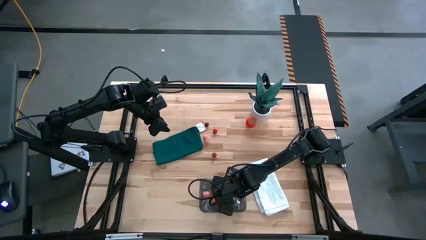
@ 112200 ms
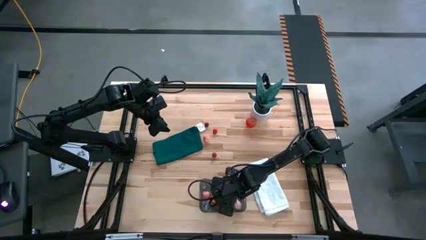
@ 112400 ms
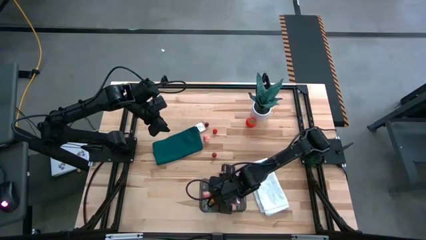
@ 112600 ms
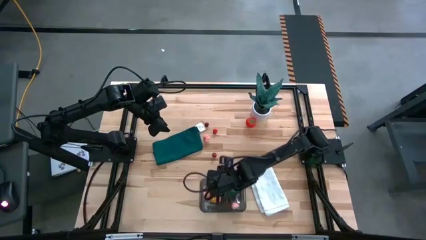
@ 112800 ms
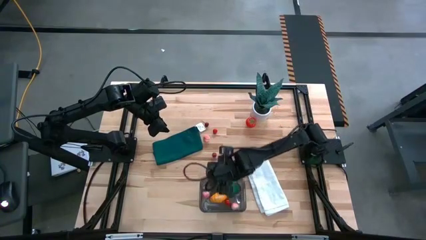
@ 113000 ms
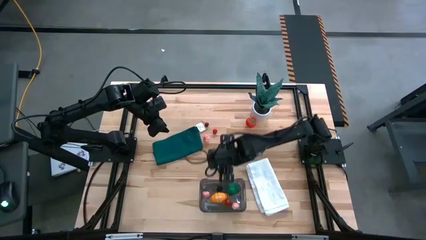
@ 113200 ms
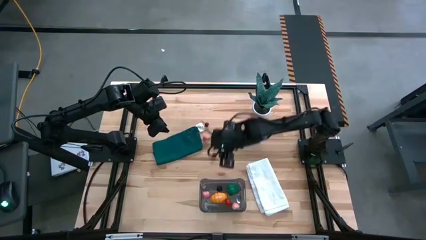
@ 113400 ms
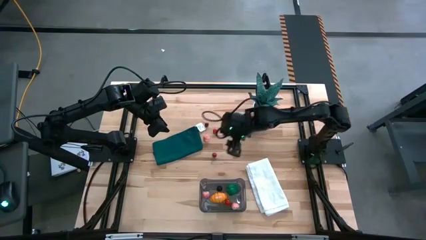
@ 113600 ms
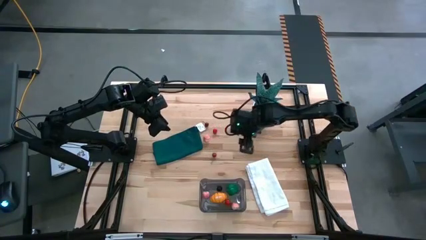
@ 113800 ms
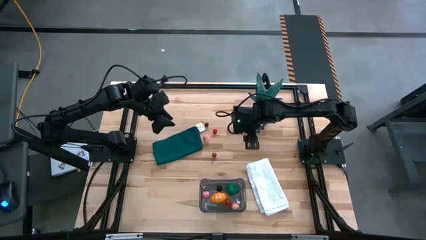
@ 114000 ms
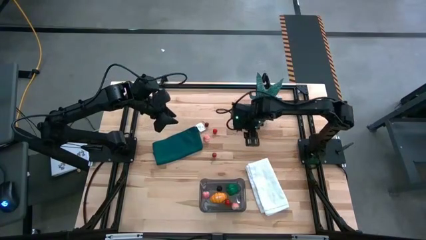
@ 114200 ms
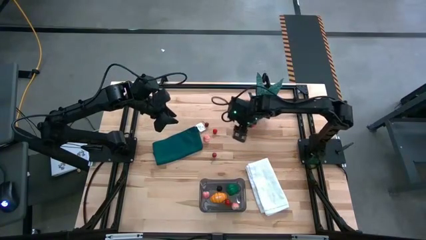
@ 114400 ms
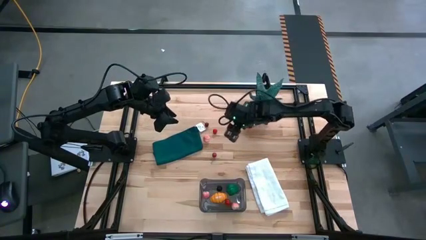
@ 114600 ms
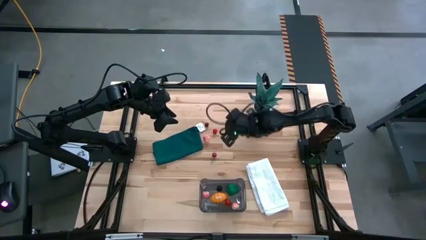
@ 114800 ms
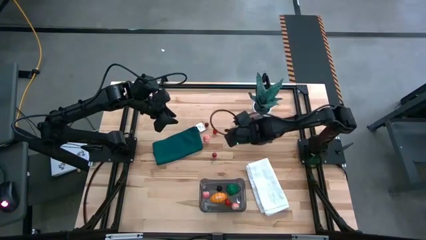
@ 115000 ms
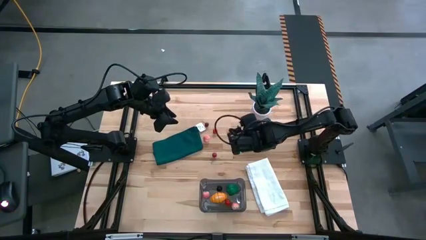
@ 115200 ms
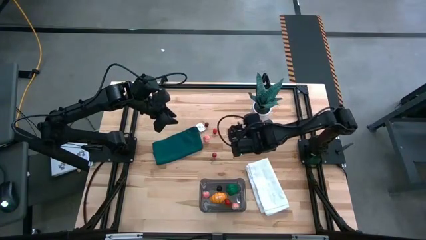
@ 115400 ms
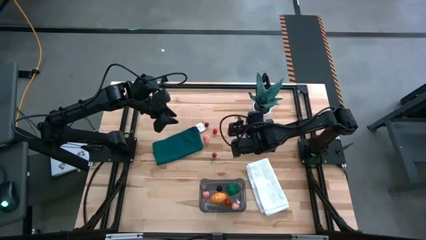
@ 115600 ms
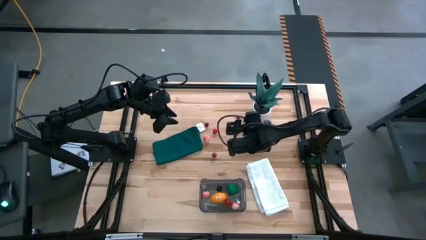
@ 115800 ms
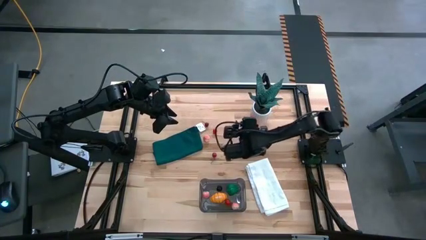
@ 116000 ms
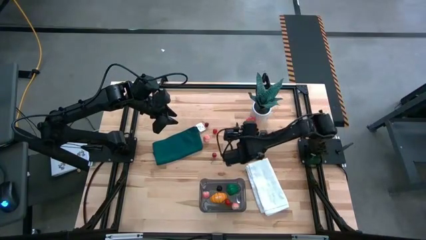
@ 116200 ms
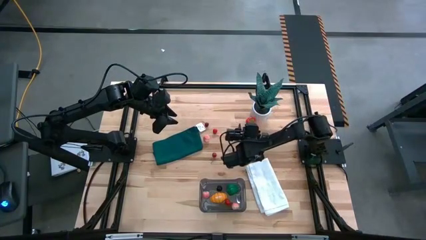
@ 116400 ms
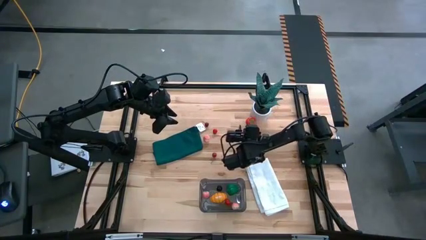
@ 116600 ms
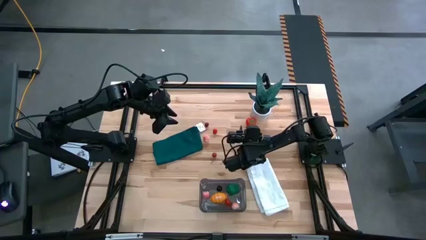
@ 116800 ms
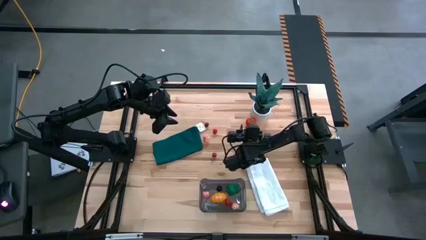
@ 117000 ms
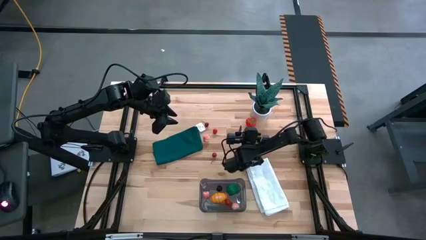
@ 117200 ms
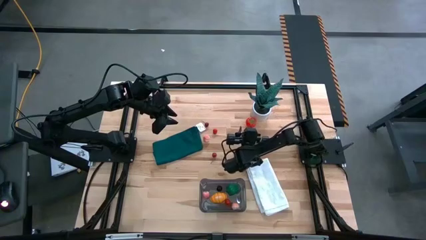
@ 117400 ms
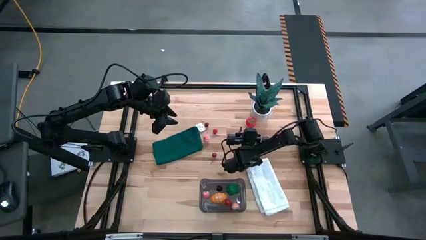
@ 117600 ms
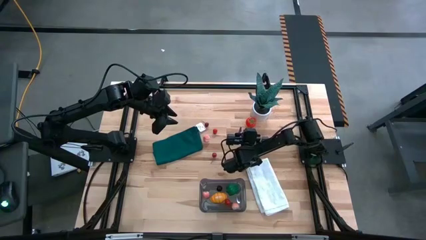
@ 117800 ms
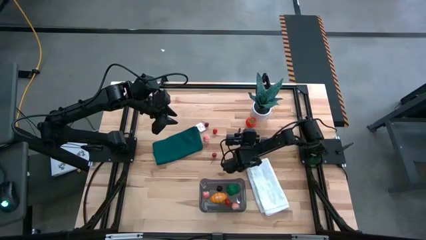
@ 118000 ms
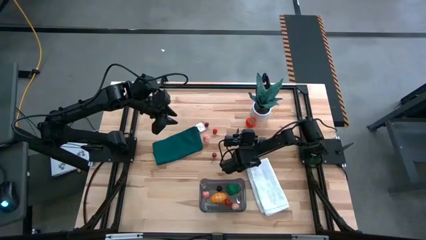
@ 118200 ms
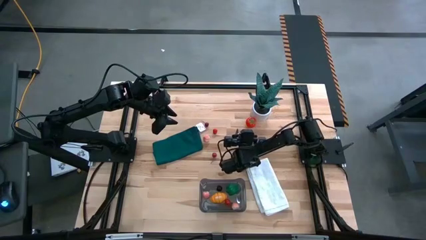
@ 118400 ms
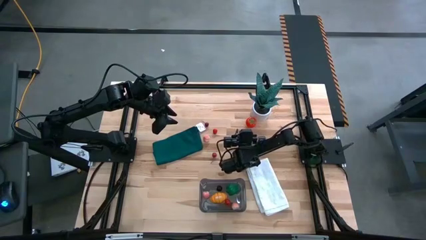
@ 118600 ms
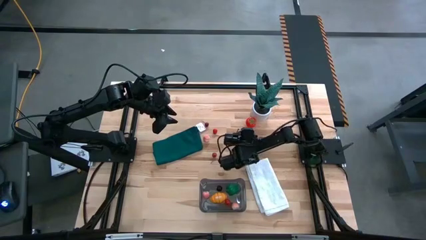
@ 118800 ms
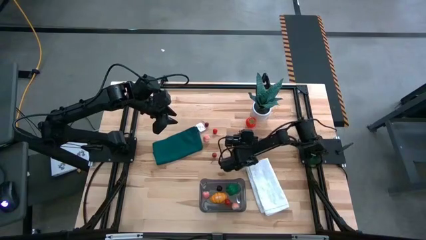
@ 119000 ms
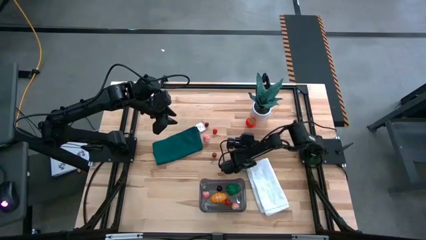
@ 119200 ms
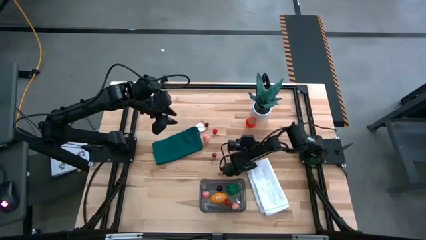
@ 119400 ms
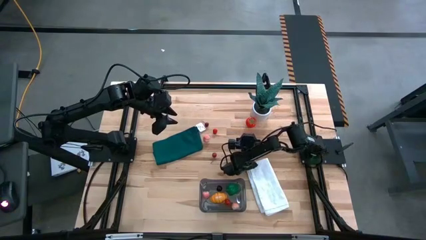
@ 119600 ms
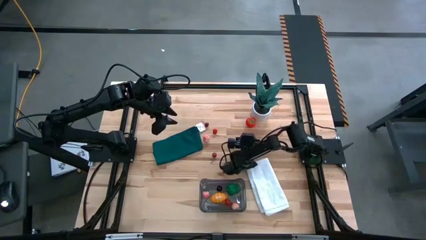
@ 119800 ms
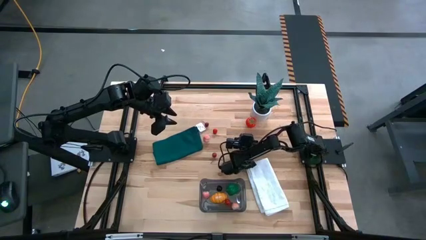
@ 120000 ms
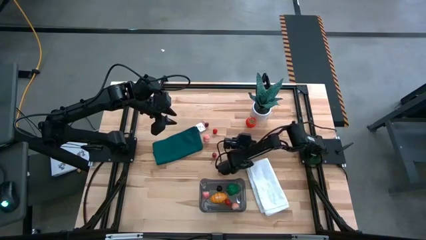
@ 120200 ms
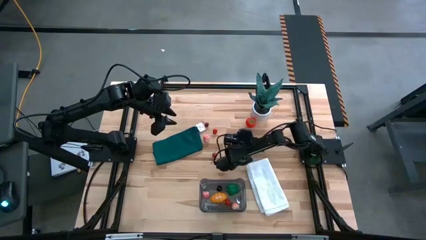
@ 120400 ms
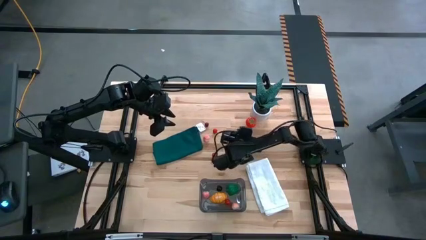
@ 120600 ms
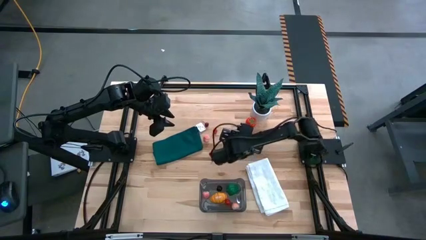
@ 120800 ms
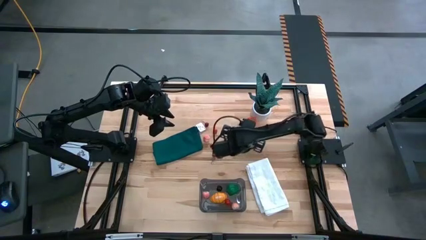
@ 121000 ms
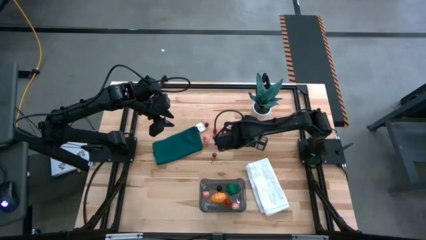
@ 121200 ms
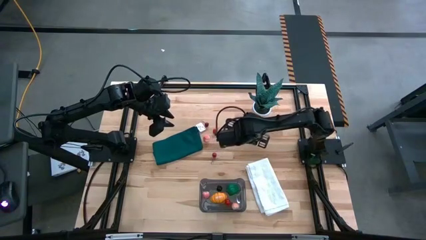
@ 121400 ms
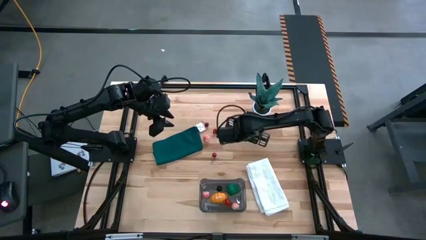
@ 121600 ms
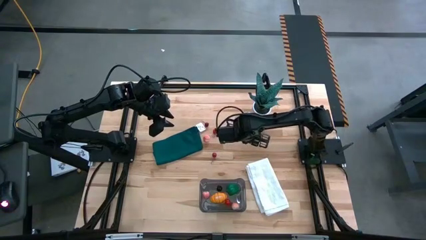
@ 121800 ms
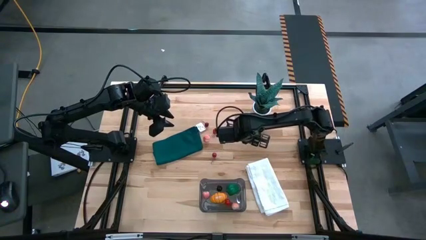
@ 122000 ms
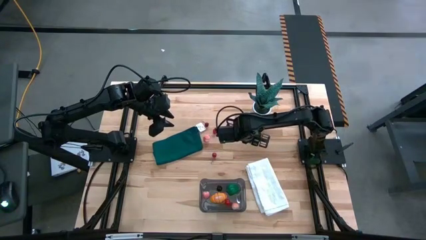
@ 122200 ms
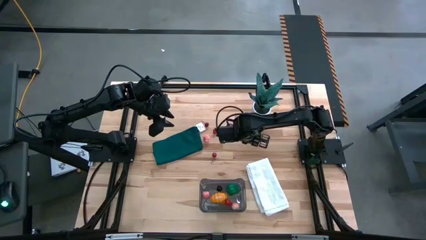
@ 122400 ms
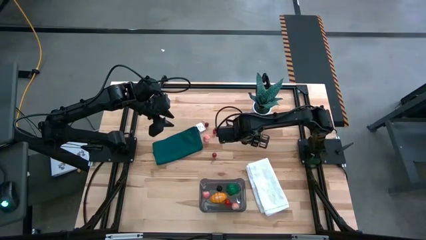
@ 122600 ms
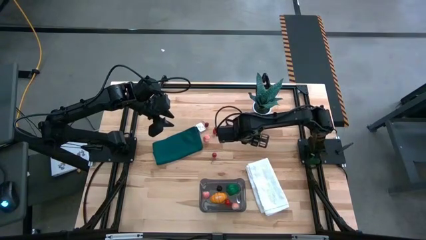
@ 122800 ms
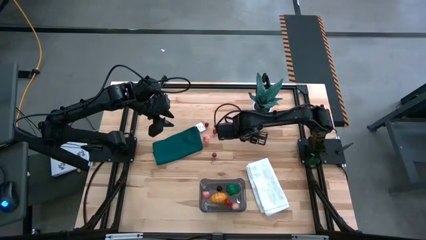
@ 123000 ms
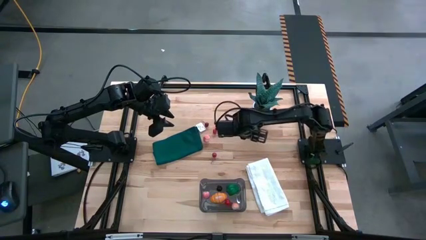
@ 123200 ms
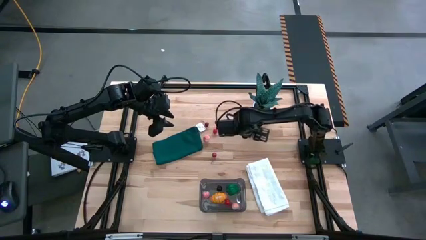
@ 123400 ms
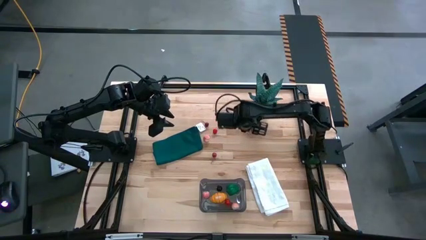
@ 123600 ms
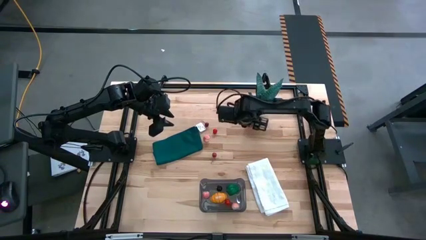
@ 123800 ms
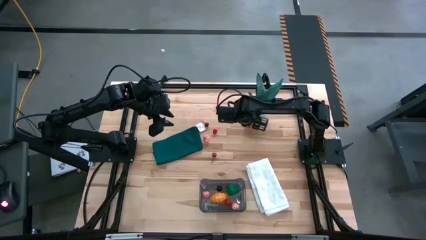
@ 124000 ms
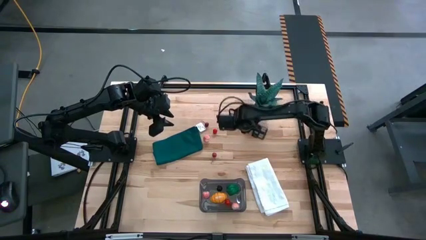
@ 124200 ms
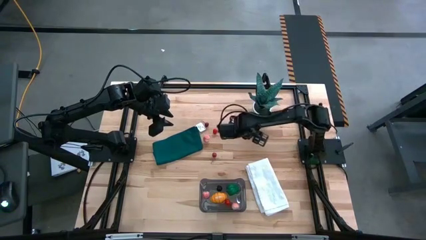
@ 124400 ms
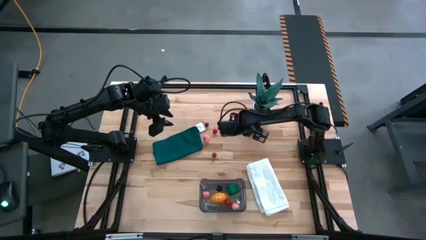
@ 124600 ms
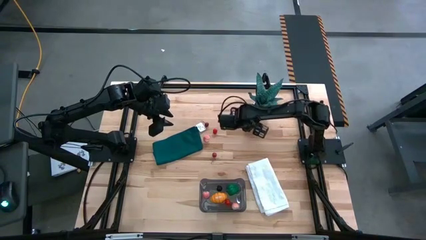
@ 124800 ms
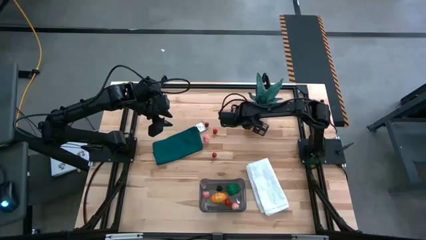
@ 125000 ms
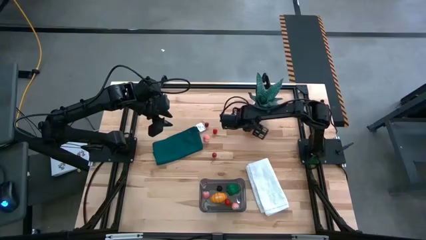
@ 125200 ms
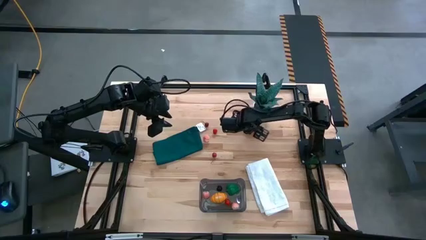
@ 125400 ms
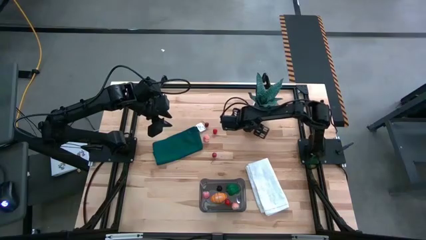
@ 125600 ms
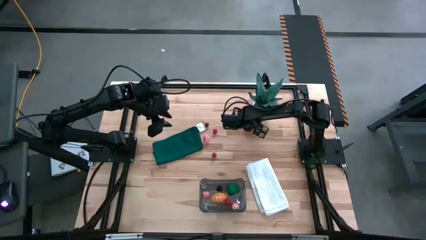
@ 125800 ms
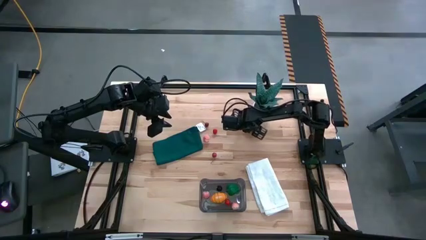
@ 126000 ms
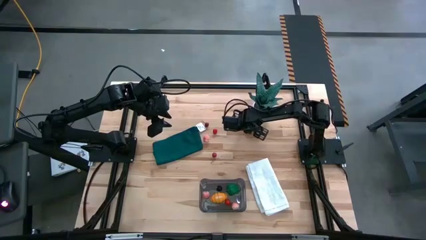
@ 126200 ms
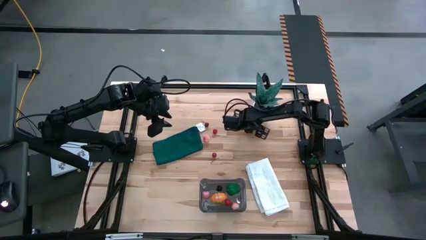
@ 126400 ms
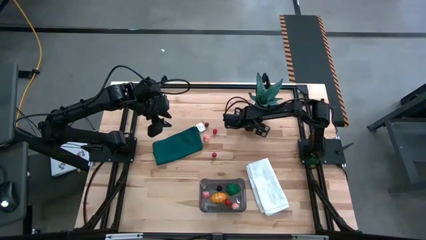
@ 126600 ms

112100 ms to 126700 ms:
Task: Pick and placing Produce into tupperware
Put the red tomato into the black bin
